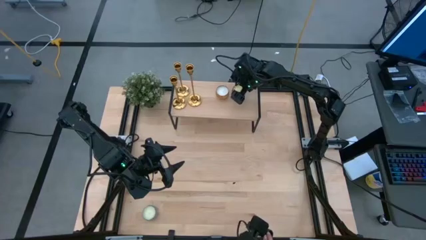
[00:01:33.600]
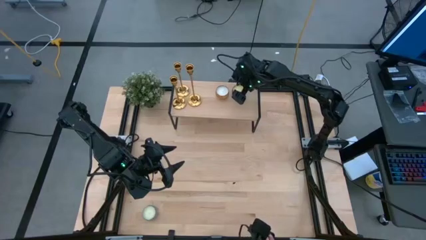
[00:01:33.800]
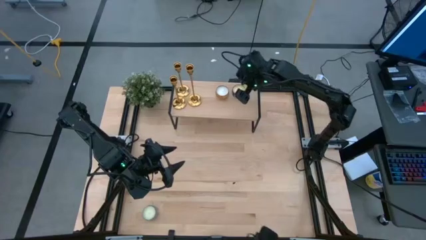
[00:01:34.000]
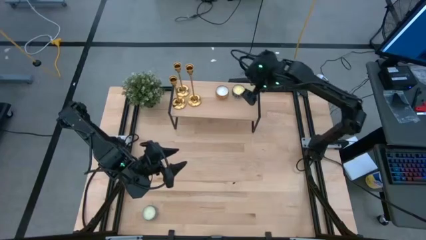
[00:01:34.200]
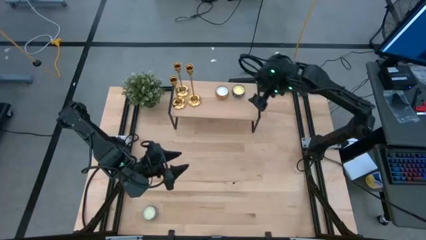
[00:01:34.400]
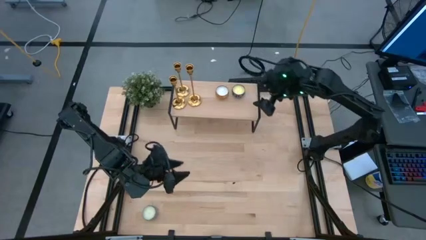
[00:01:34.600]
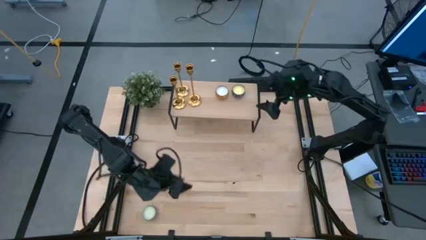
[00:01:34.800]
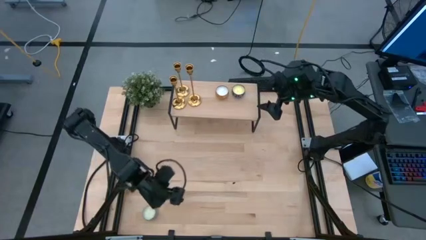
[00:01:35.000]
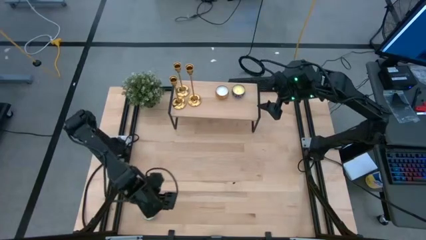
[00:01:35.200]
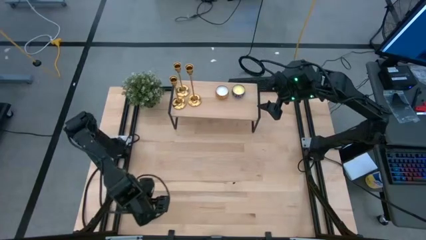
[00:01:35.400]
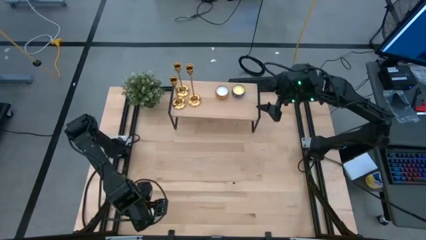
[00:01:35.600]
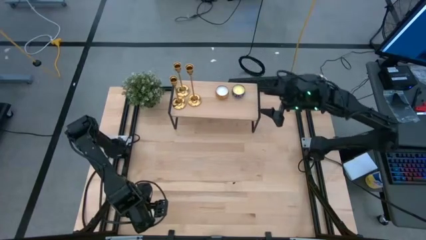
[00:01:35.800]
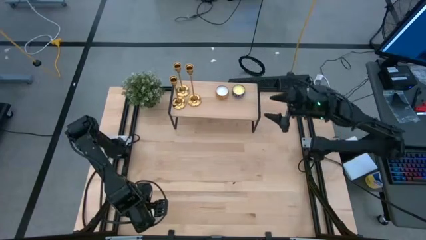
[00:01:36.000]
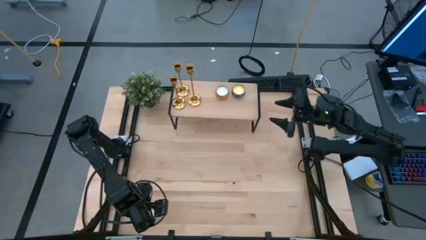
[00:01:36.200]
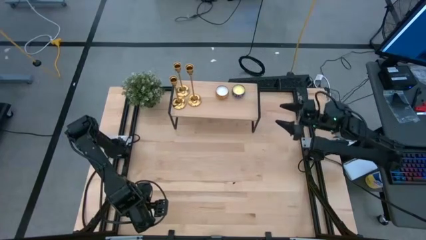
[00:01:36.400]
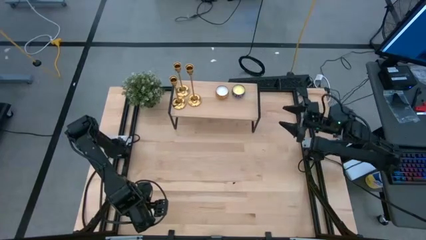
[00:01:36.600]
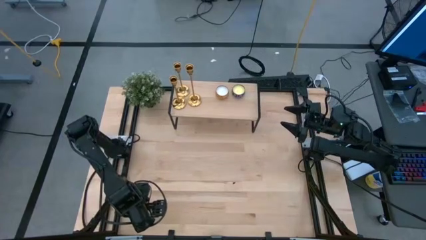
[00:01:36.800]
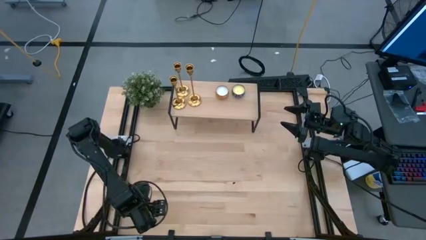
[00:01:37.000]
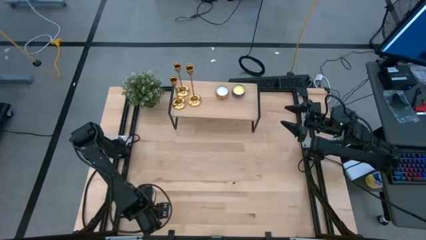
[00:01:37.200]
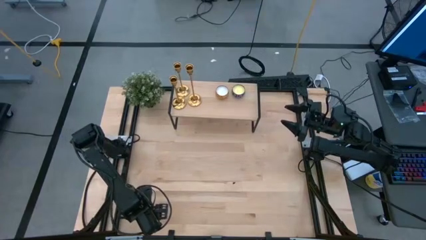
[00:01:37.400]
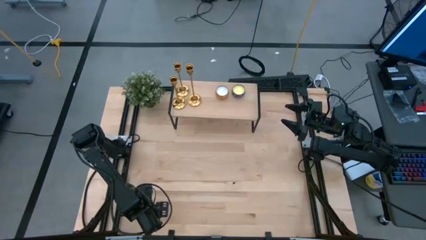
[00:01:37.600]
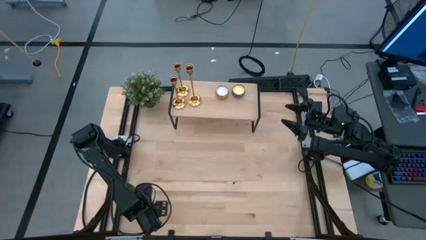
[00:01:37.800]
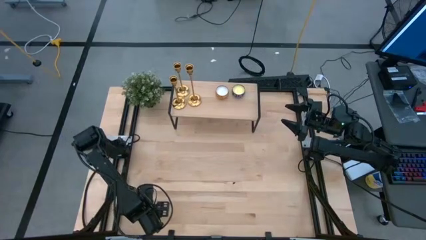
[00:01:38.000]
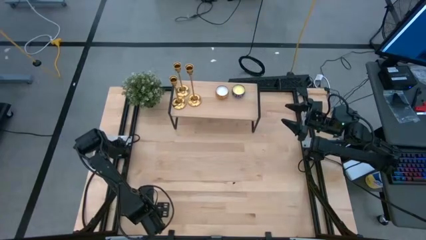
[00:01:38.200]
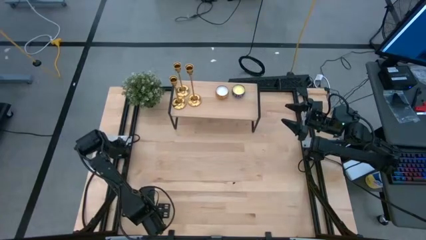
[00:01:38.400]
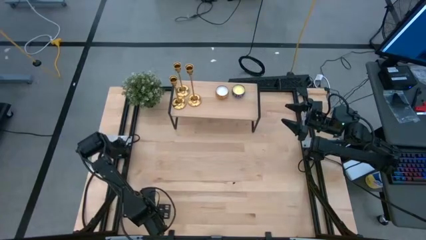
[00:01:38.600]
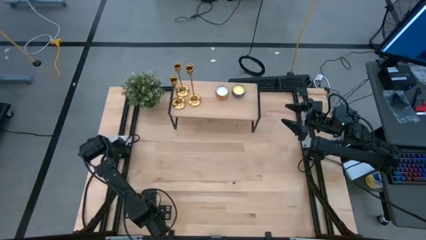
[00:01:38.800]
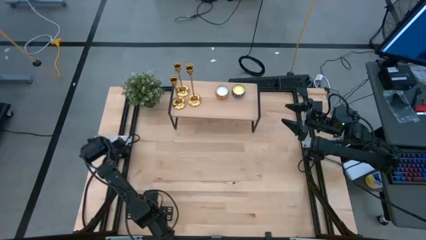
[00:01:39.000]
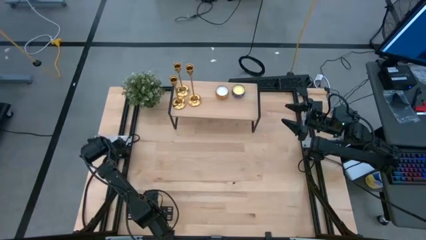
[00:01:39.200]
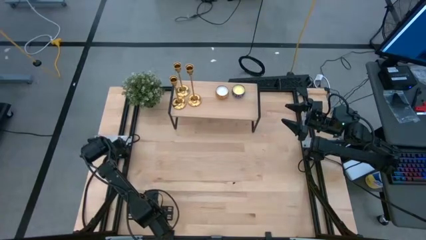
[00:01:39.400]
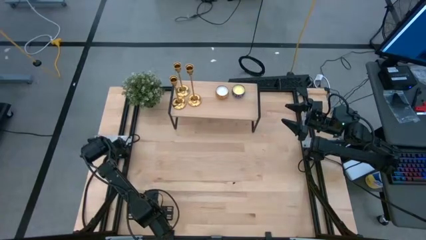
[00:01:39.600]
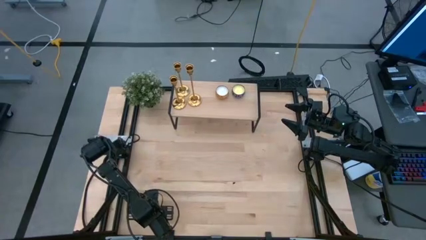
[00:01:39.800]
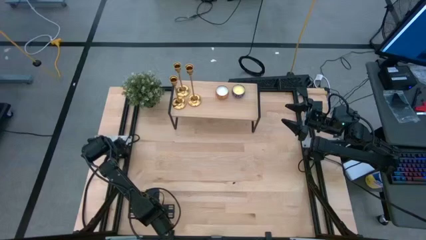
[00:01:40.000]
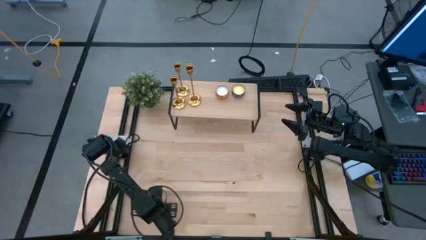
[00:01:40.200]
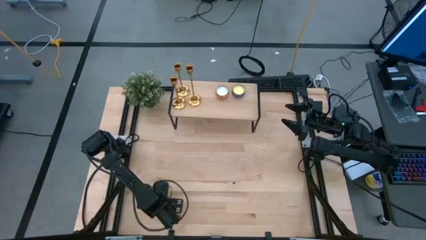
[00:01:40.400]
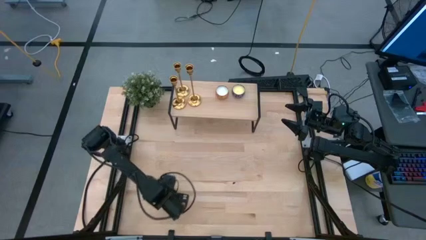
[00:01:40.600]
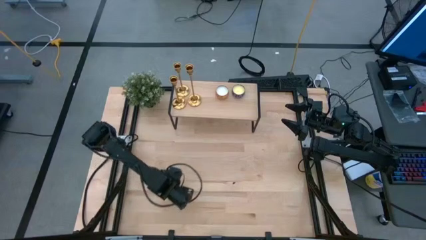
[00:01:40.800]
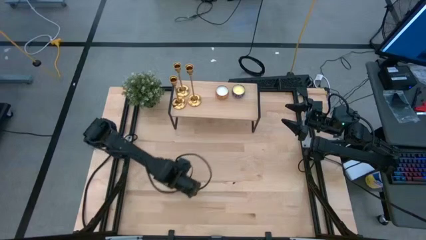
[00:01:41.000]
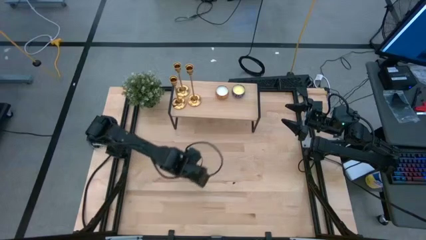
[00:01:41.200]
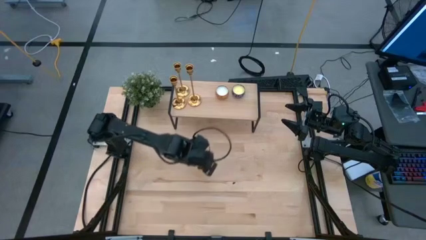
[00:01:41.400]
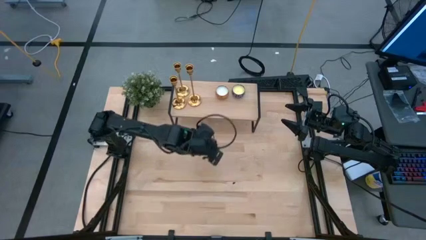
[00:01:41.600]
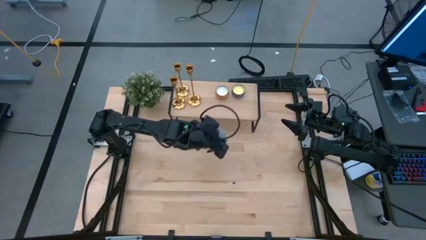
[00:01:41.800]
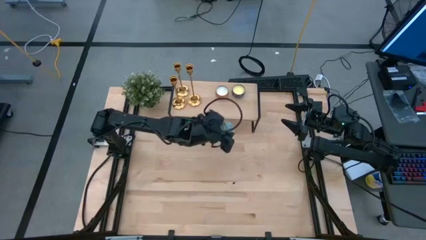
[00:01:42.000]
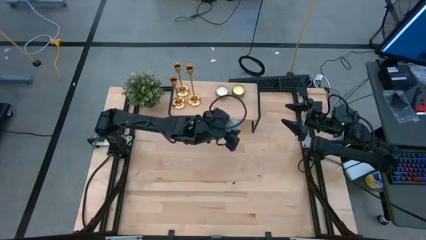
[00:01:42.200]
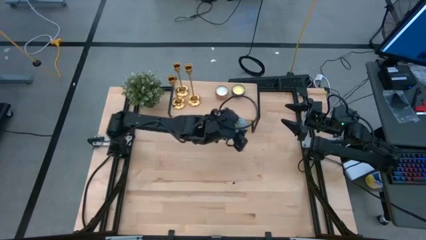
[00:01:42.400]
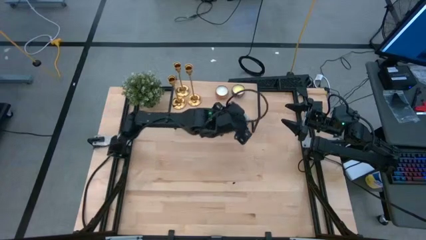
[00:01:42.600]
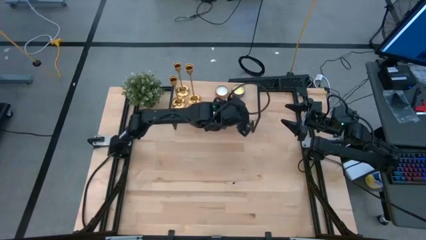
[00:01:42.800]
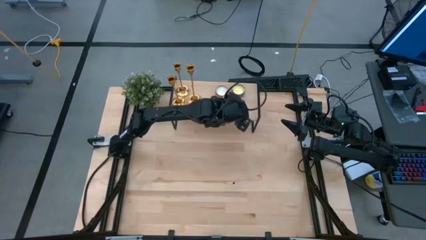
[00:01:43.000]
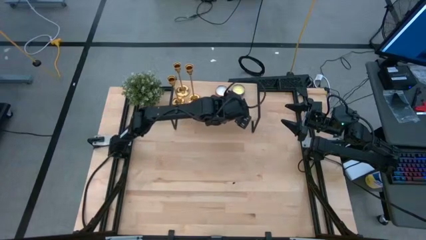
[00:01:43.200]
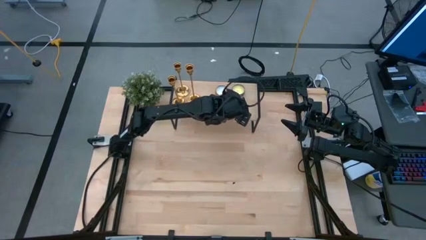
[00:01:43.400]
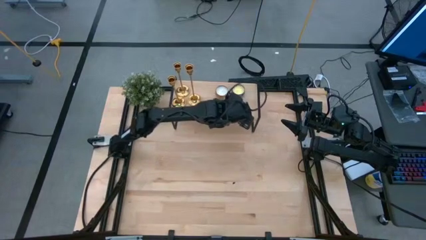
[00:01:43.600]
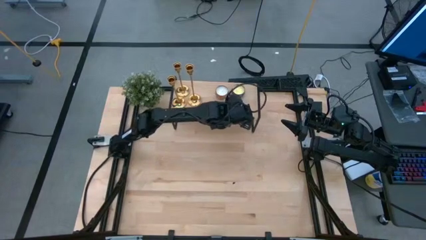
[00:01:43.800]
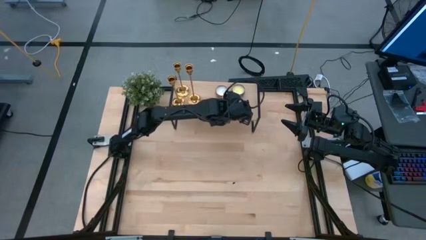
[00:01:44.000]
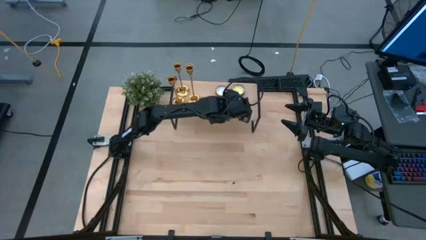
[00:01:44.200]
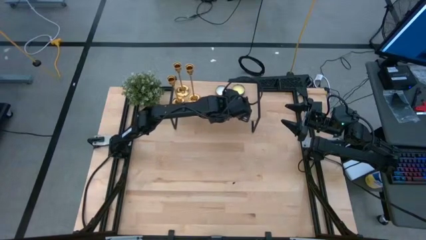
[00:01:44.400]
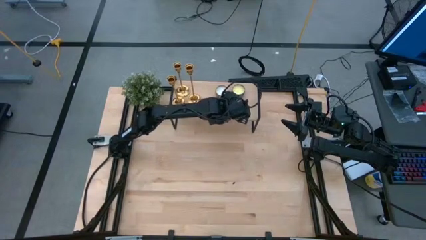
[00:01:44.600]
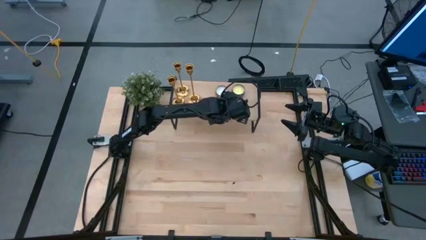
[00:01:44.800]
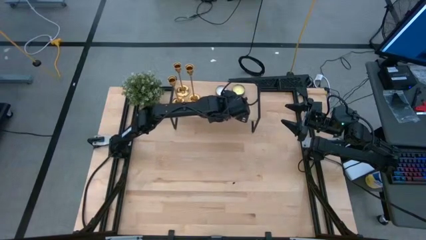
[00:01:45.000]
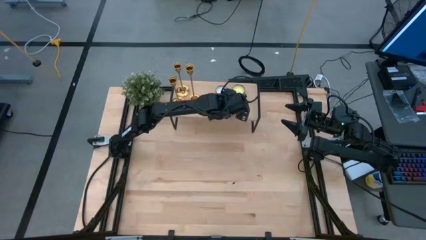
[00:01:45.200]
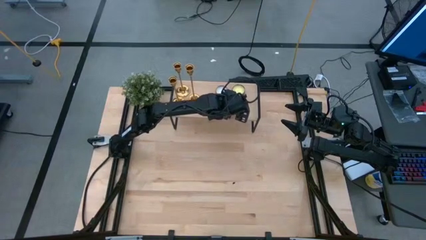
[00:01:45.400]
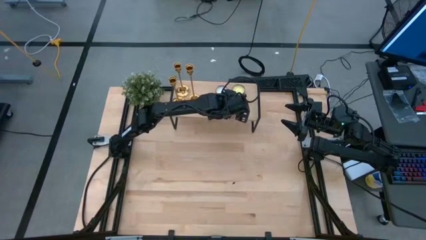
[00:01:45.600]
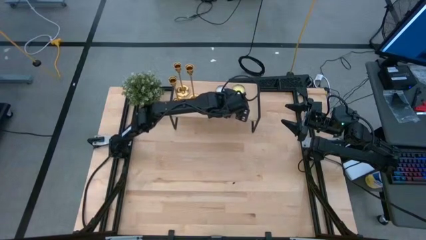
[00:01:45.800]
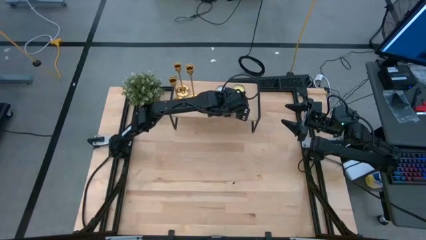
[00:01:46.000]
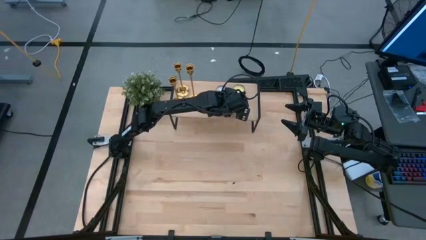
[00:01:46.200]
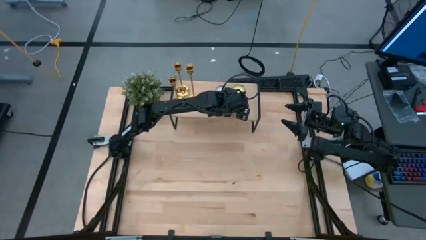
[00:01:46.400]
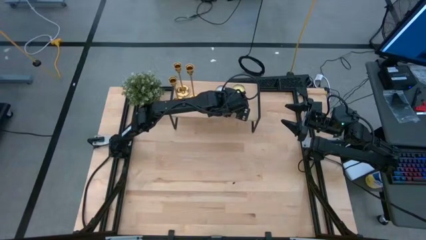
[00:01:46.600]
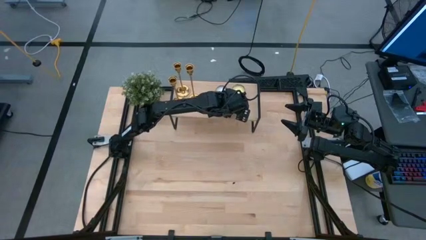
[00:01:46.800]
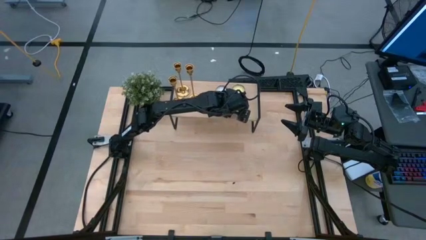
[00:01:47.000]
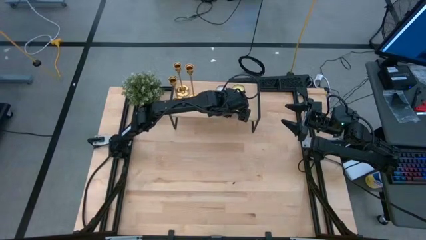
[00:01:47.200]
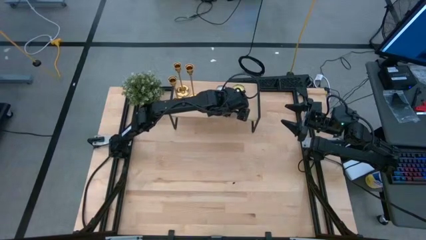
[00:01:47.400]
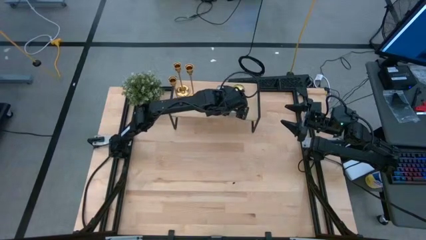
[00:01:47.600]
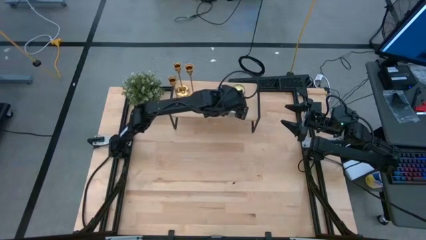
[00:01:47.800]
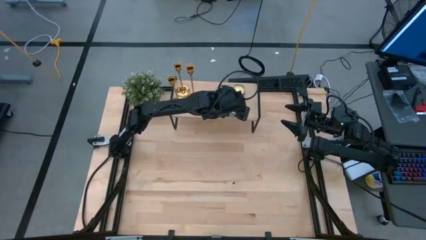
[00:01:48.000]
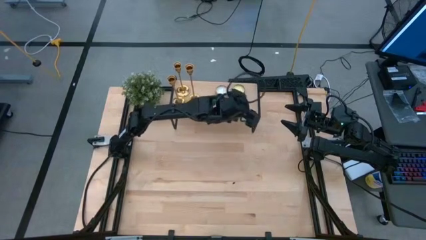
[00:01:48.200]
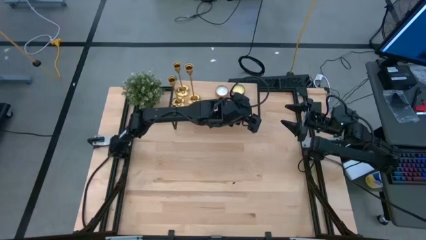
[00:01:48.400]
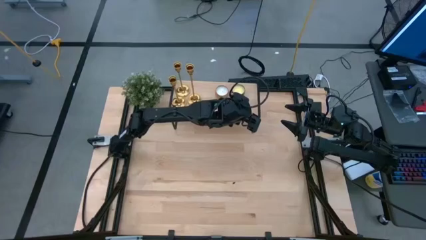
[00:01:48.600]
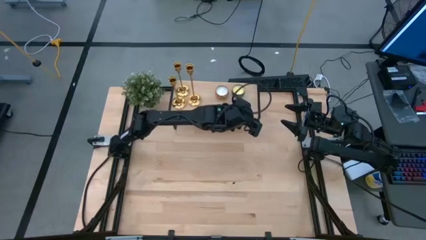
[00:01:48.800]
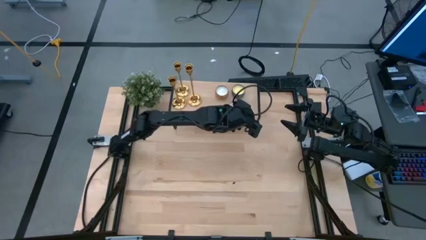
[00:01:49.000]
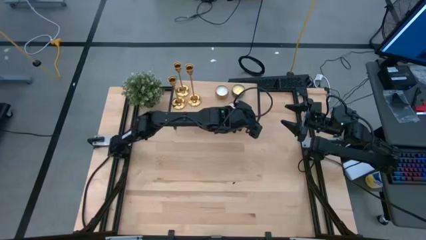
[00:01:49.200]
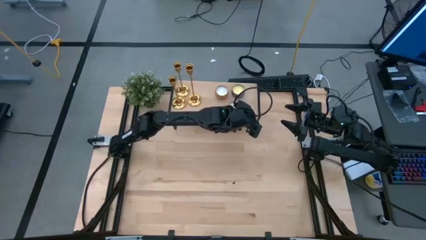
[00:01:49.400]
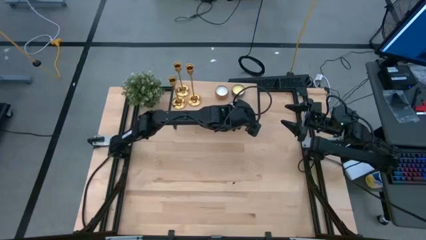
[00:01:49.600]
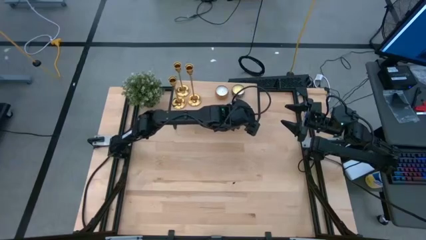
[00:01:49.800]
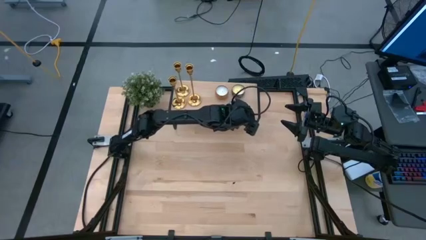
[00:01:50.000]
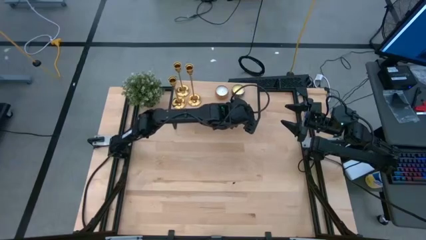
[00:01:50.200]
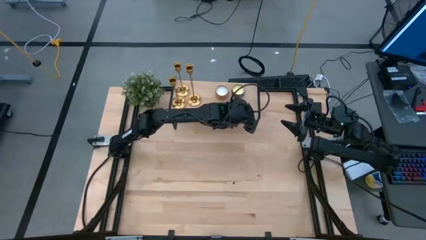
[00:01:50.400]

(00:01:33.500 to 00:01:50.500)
Task: Pick & Place candle stick holders
Put the blue scented candle on the shelf
